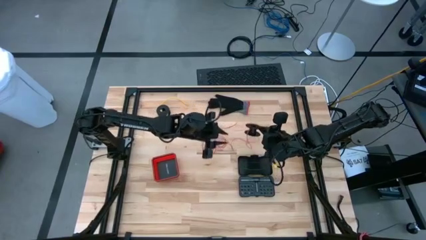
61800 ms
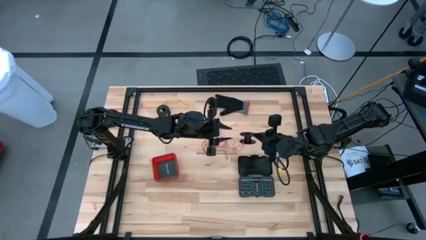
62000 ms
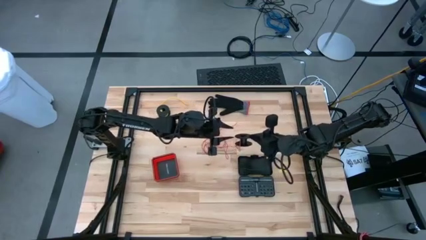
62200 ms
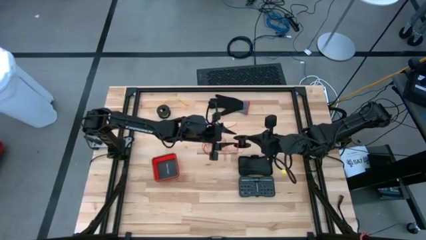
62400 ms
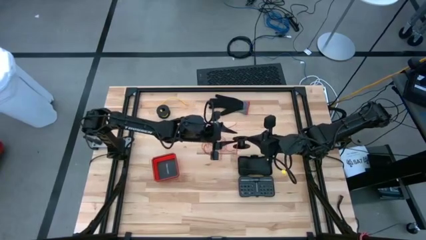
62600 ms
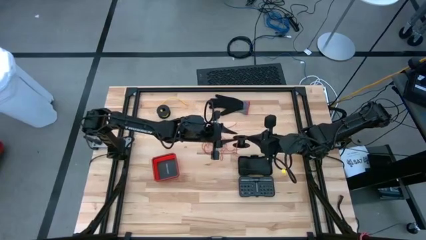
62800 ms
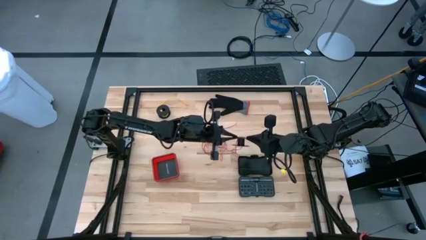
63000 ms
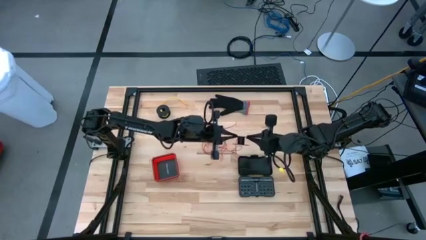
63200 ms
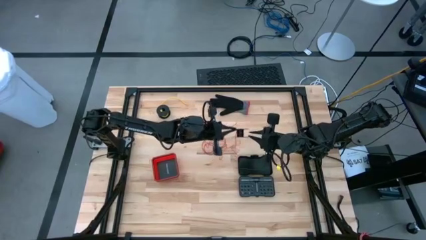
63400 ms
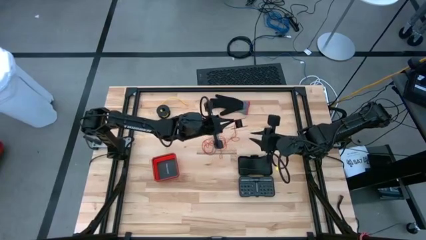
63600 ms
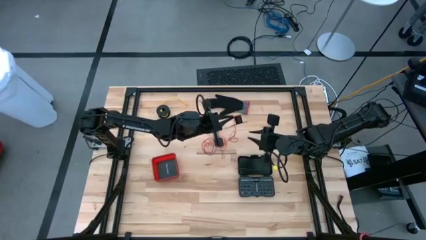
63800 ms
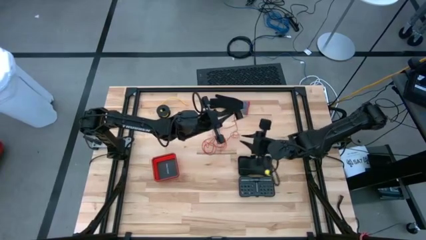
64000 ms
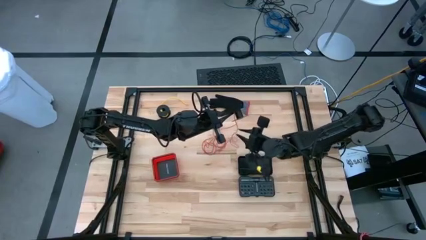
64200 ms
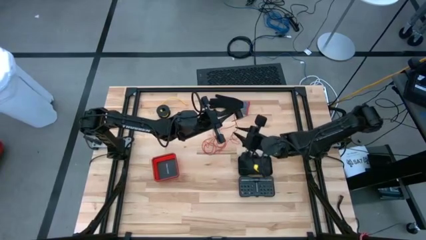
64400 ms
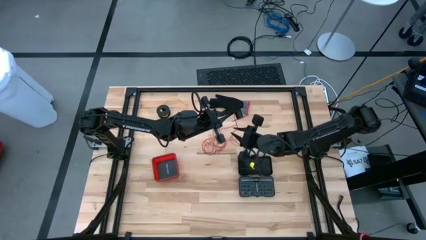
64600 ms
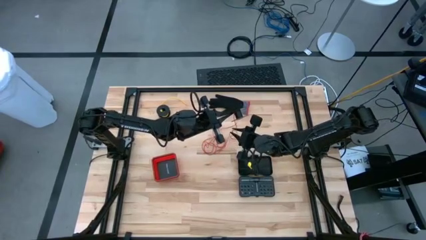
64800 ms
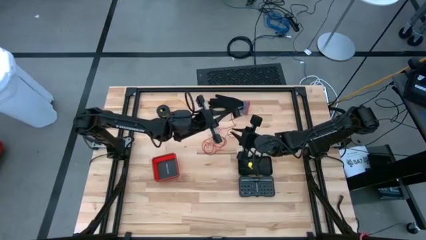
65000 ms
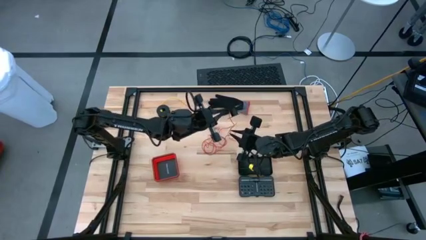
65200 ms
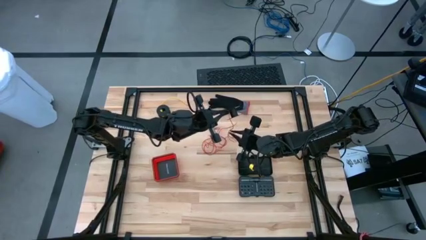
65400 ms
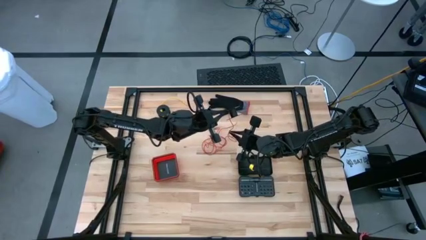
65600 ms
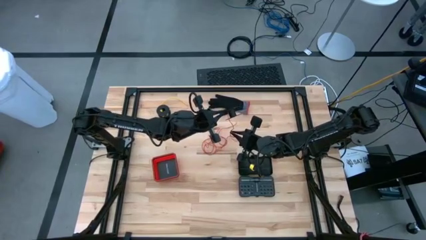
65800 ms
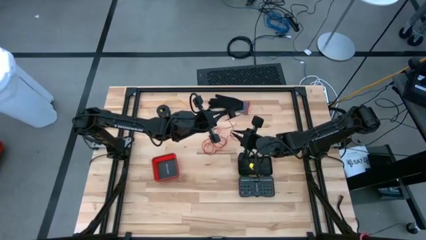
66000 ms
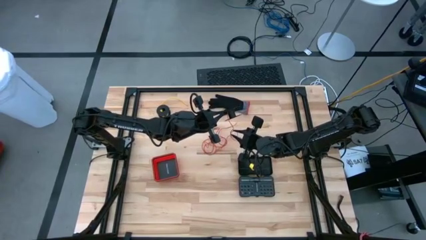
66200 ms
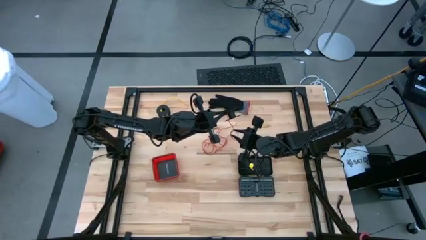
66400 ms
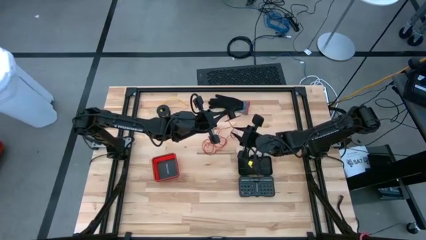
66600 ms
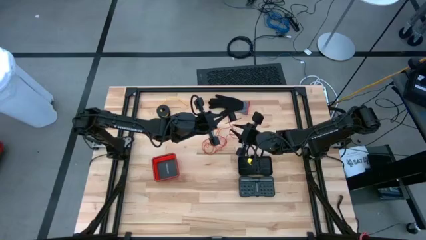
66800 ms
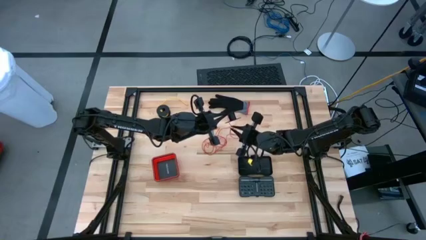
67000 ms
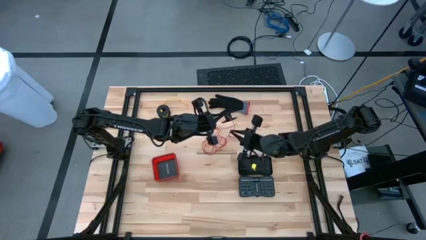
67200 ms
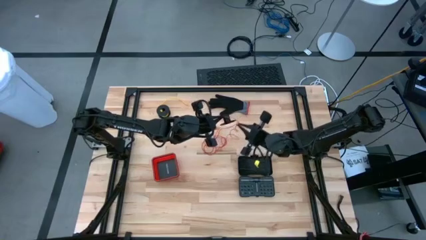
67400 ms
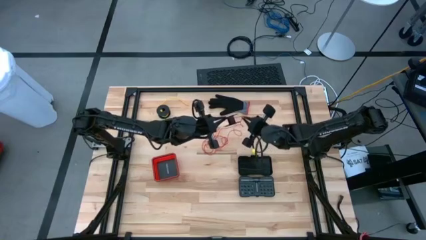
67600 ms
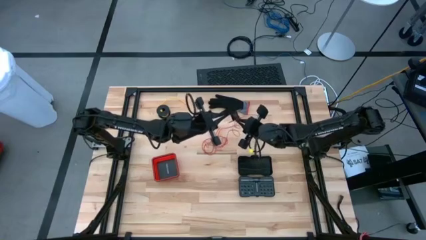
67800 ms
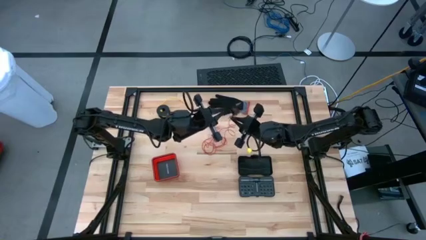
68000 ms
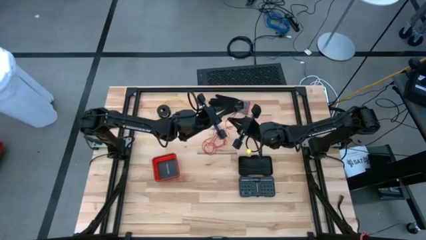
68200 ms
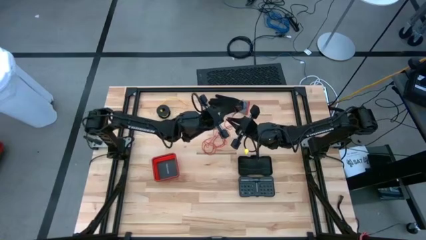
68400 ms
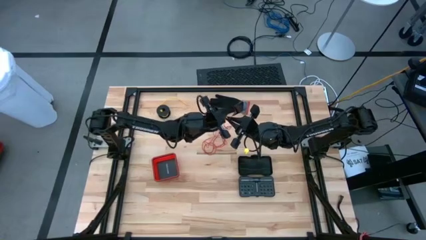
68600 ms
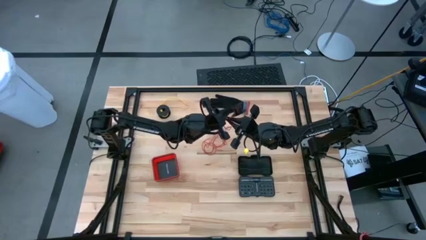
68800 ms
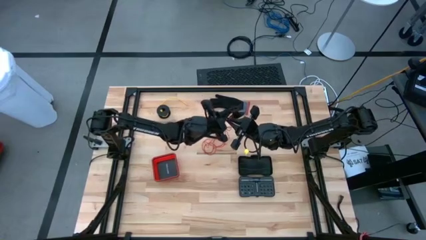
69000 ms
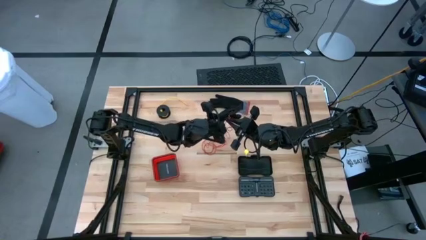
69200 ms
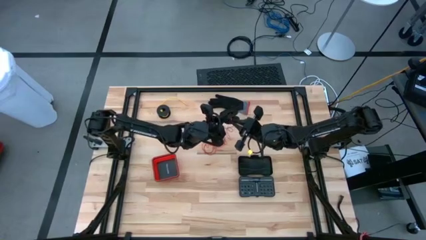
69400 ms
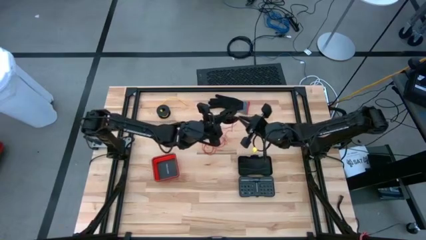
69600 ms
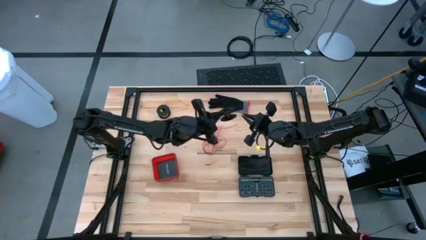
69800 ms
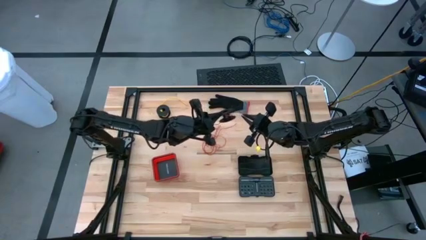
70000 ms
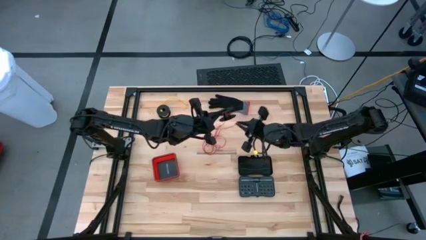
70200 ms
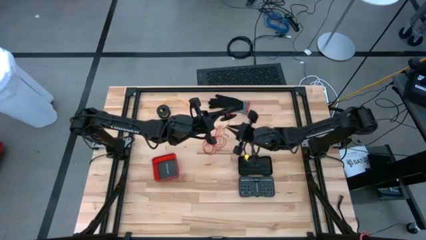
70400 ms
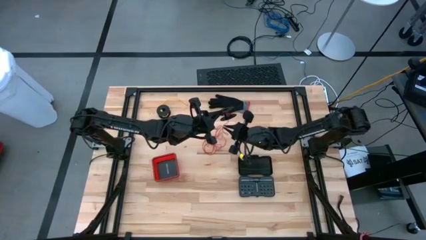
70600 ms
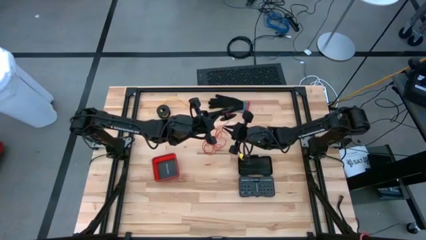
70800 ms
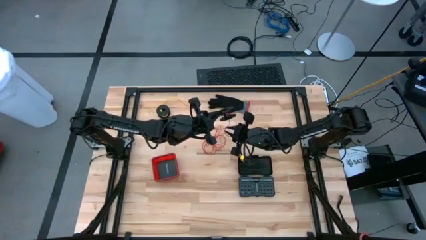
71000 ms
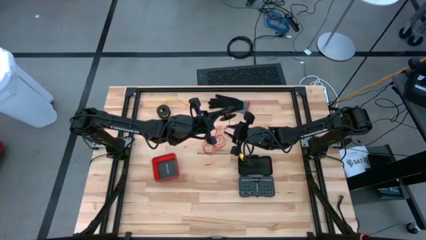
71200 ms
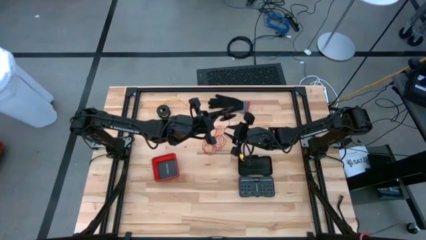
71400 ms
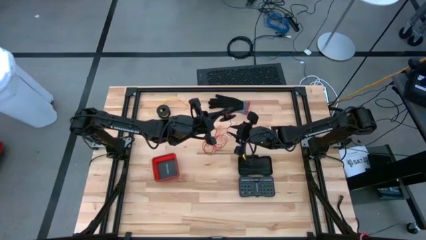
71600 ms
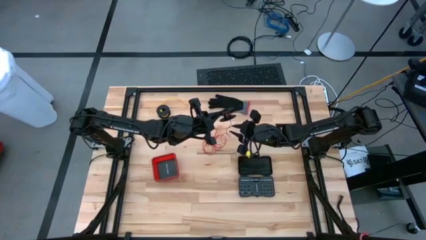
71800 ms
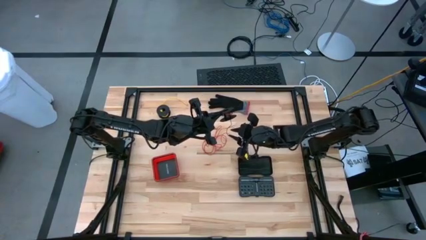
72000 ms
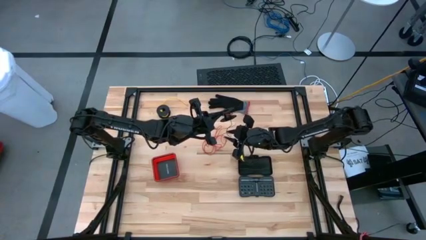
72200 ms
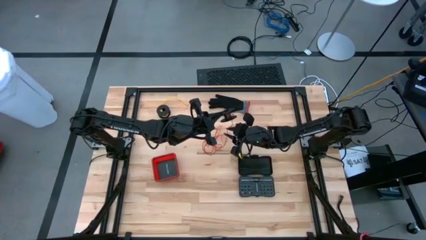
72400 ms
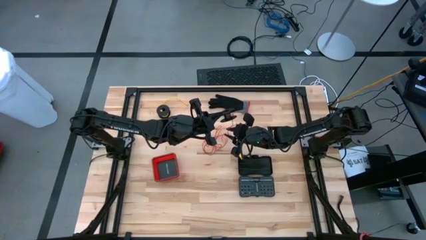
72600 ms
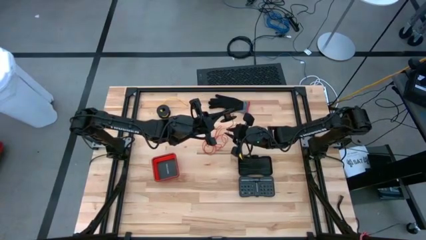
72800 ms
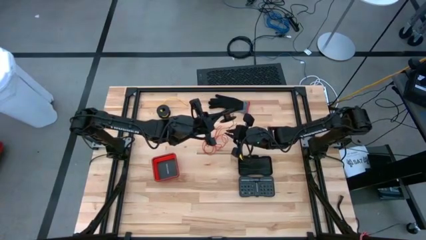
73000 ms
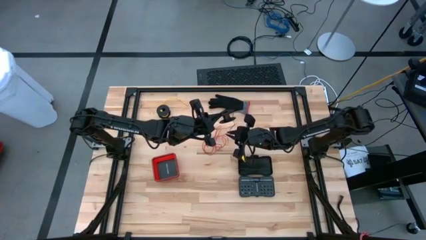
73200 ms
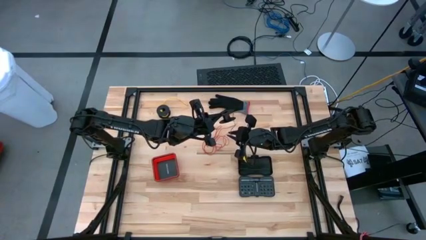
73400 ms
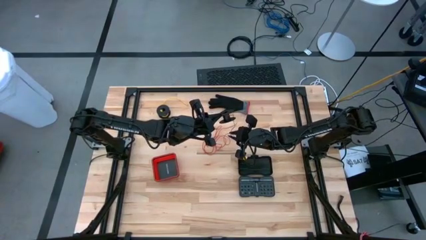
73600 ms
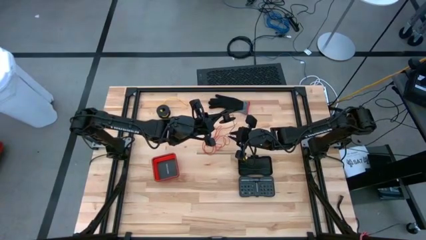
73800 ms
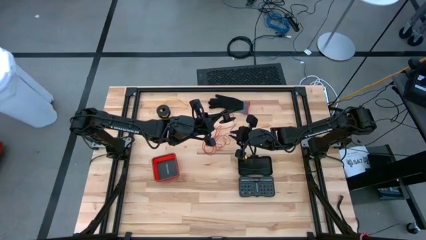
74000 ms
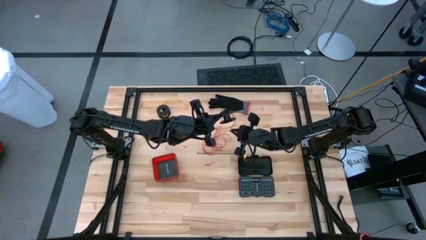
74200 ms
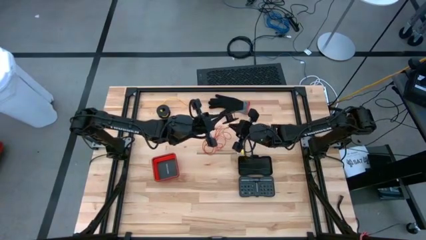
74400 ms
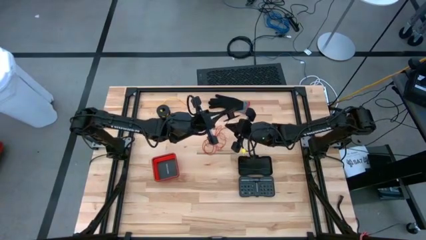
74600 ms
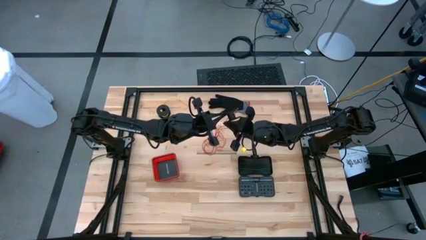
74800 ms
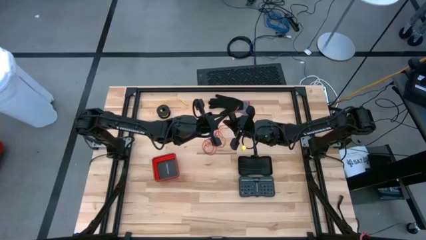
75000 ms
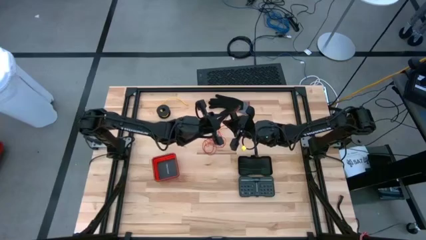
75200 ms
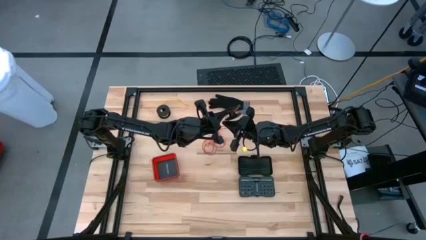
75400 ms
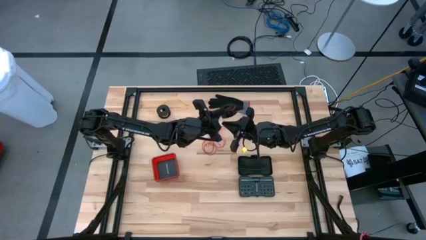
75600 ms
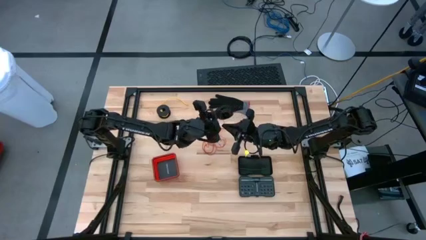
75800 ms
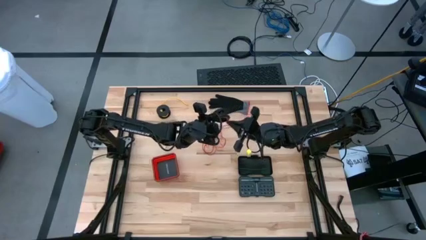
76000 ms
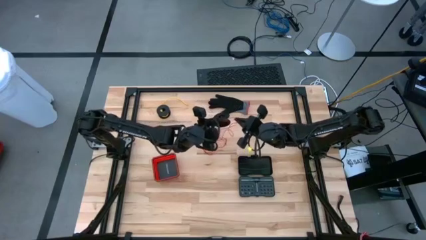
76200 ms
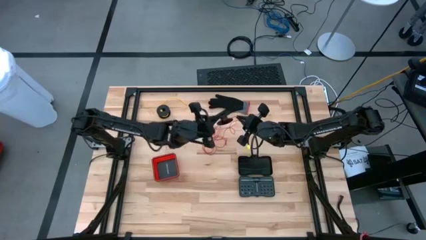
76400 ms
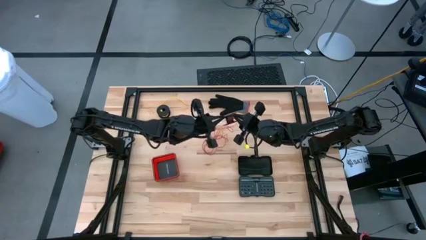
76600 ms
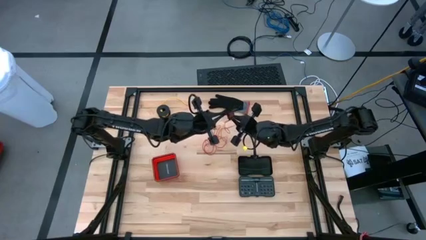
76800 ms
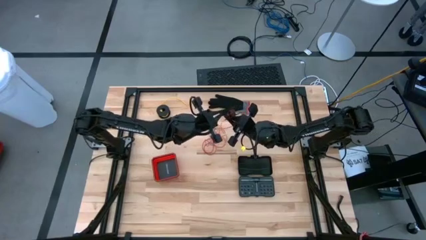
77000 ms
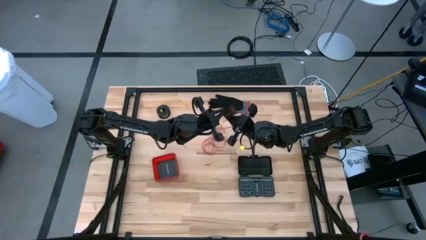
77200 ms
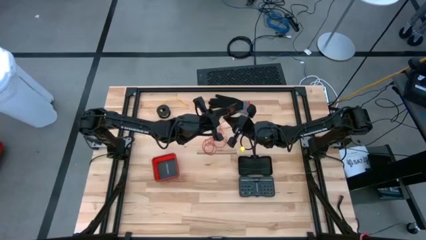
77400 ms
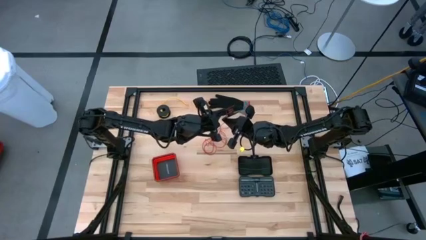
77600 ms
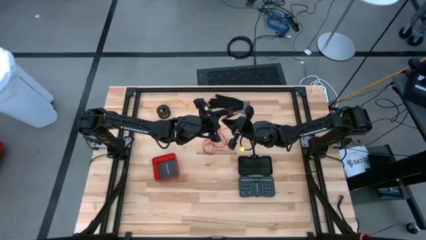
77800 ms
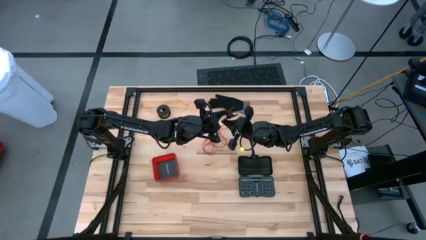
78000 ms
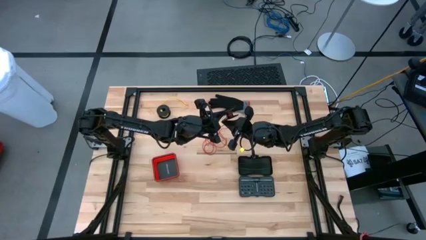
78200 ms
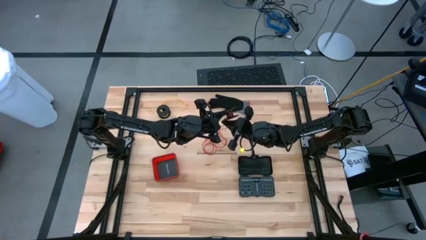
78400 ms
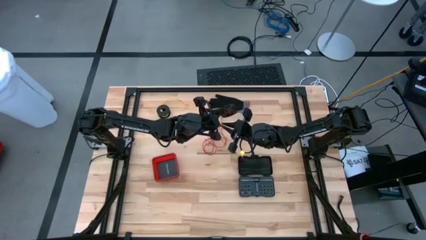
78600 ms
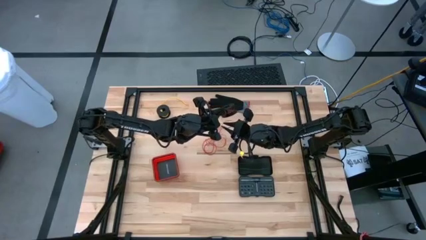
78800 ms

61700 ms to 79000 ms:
Task: Coil cords
Coil the red wire onto the spool
